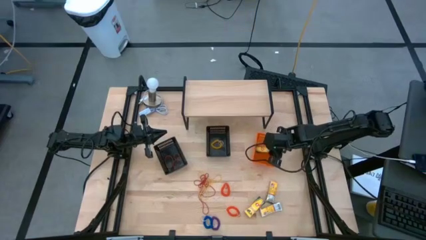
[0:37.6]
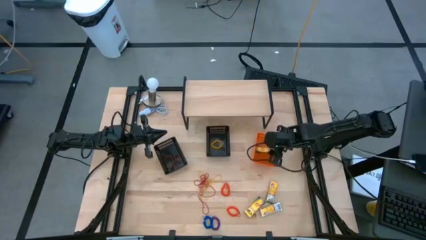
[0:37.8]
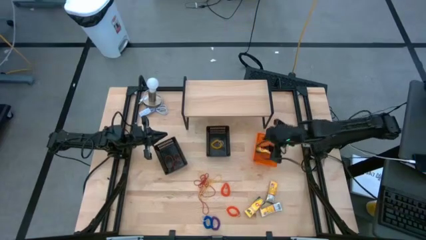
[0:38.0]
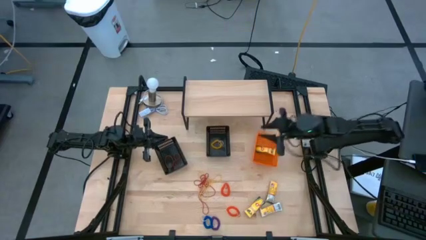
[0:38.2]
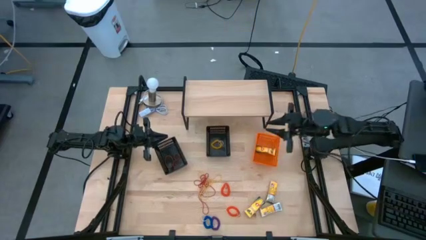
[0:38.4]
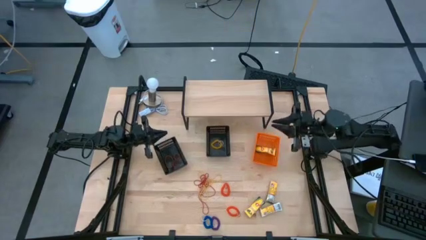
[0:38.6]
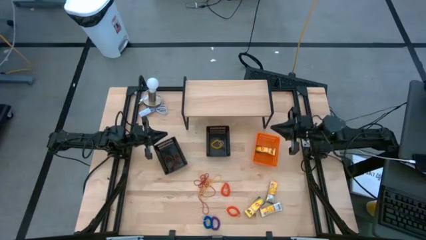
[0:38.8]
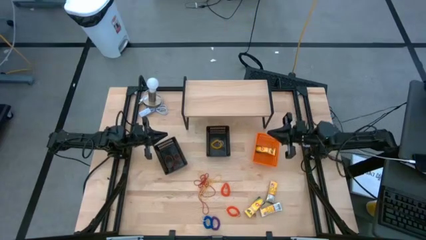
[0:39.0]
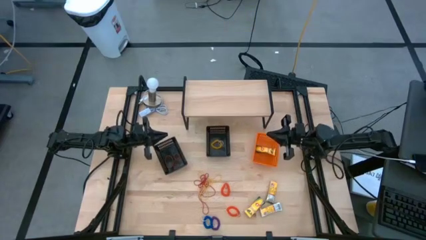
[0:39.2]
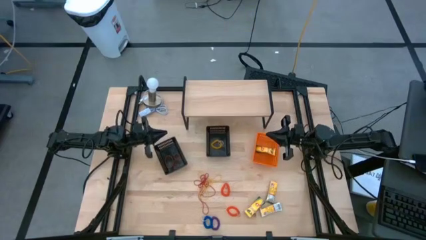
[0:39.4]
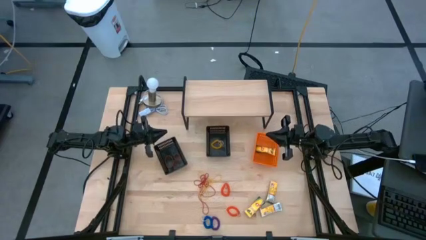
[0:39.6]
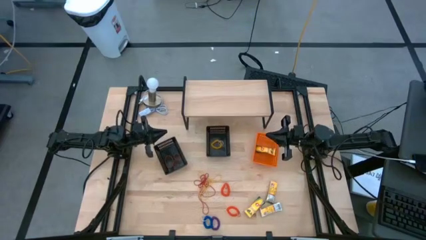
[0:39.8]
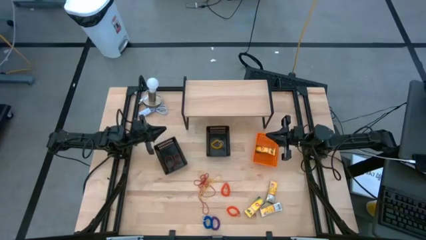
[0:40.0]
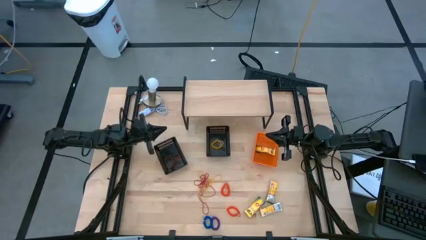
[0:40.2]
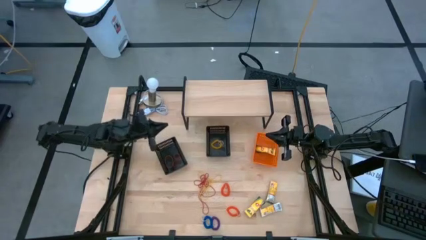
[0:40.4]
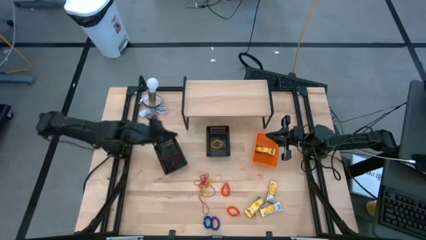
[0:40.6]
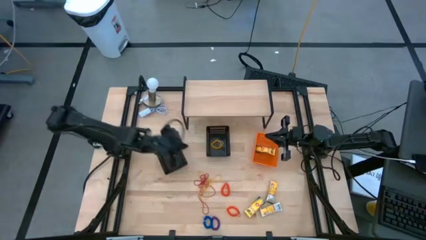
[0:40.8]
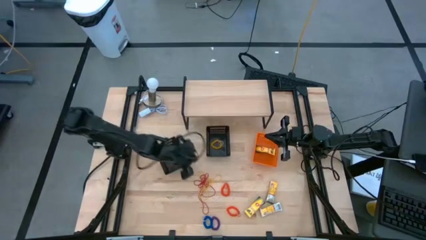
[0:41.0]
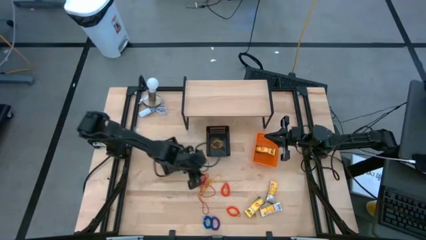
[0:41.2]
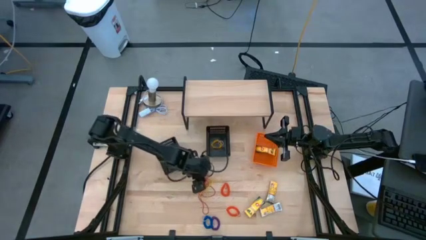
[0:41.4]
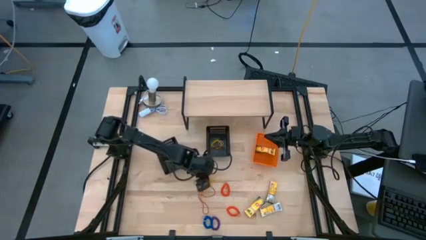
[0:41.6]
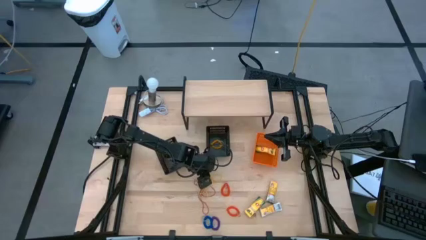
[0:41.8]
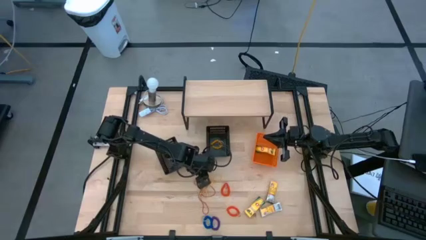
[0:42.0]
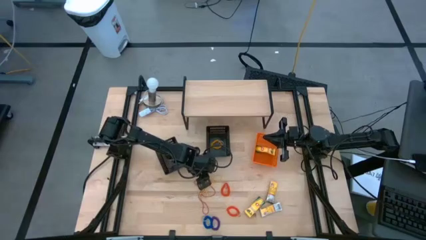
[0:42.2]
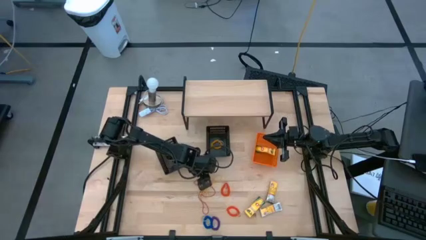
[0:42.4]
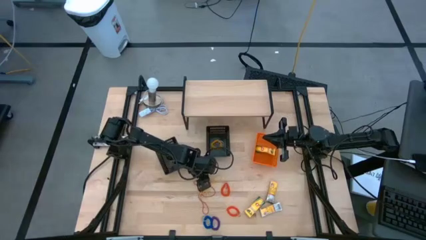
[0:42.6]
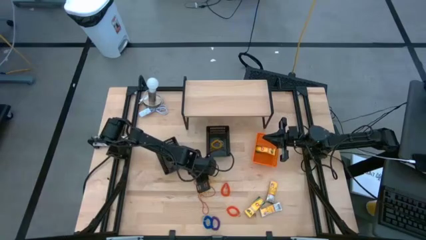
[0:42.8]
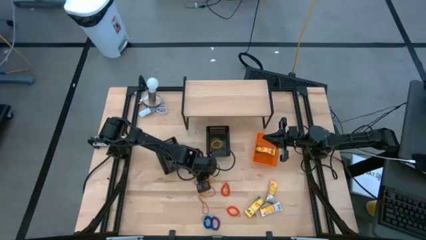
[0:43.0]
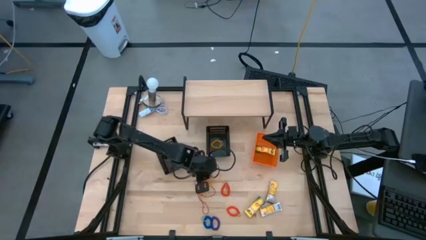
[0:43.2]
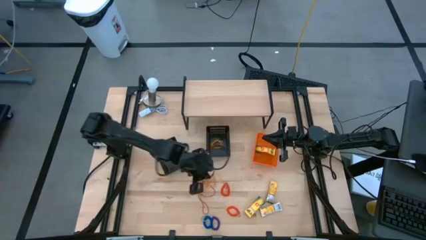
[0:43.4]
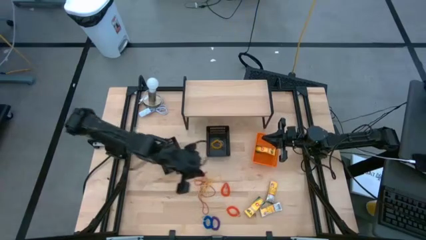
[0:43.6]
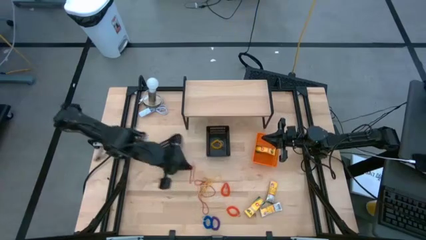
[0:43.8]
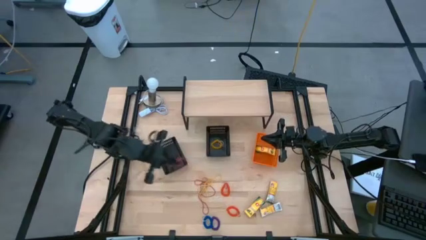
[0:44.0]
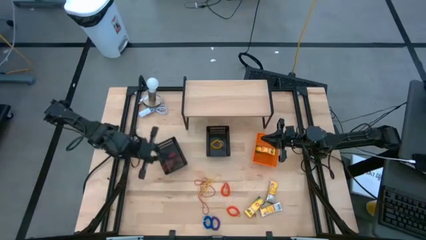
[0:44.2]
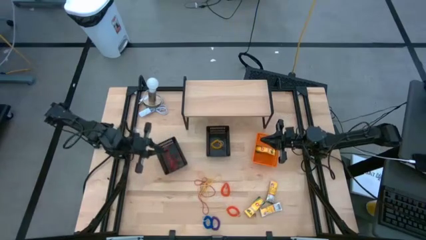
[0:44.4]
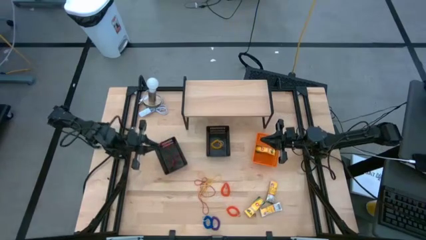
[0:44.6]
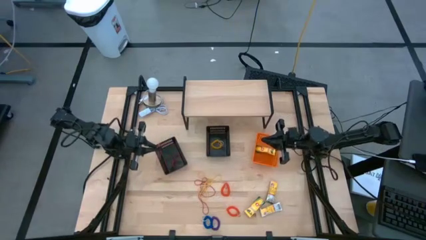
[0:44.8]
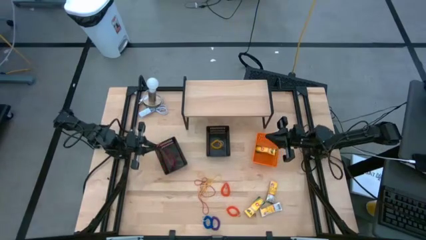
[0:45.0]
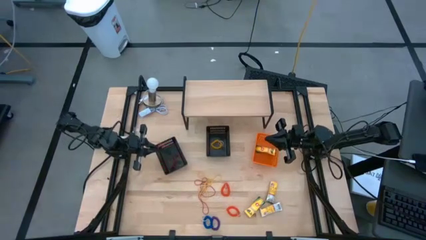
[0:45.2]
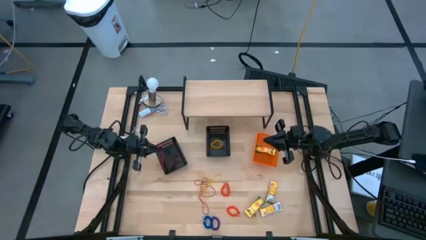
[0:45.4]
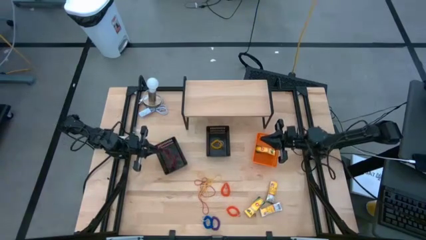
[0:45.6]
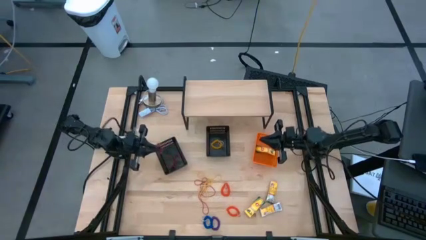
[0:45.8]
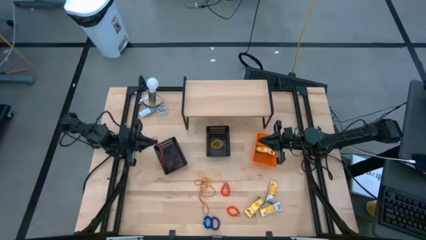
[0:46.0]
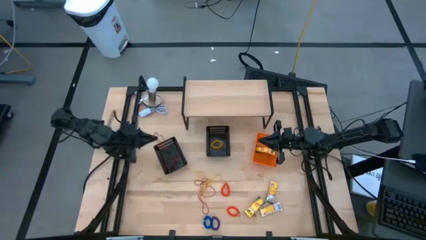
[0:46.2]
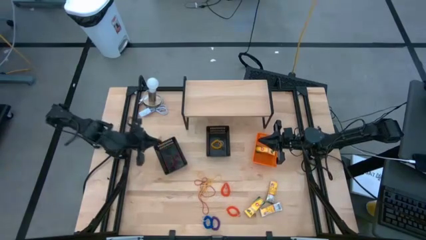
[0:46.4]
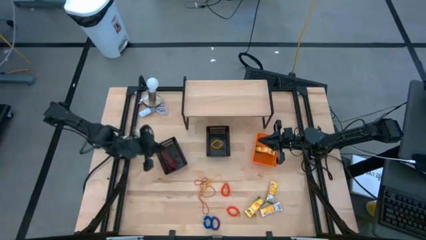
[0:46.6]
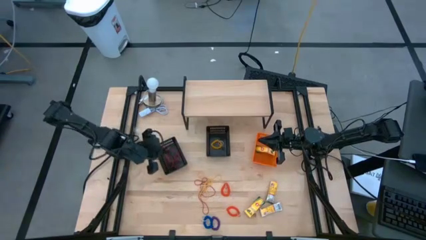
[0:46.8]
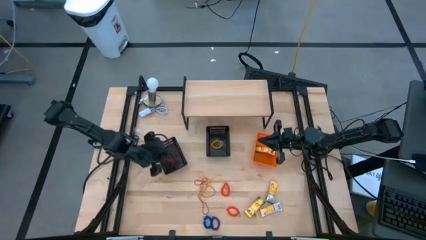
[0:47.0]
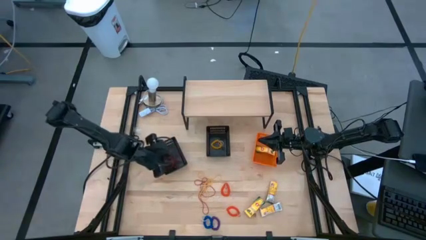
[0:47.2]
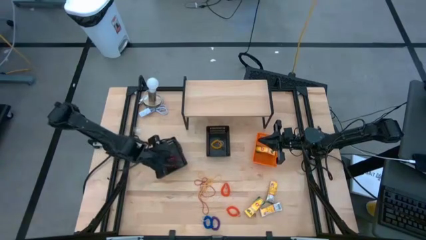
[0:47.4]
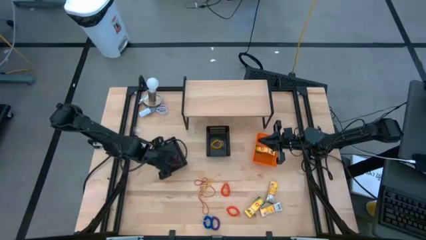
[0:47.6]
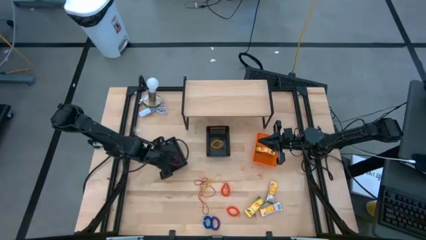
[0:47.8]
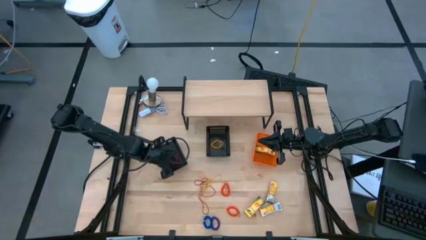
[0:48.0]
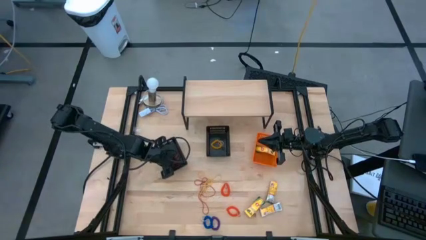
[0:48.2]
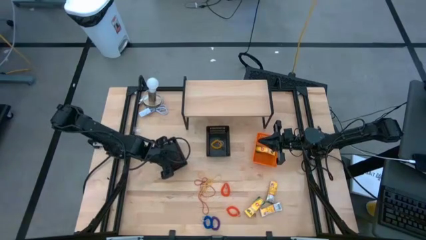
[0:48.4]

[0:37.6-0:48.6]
Task: Pick & Place Office Desk Supplies
Put the red rubber band into the left black basket

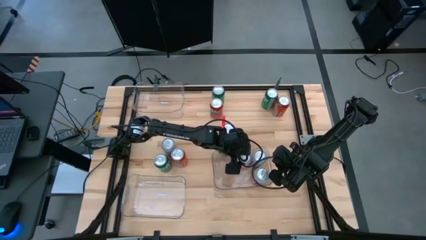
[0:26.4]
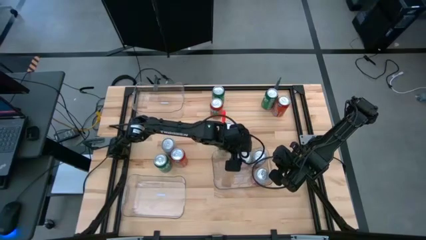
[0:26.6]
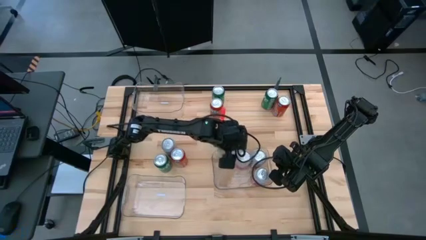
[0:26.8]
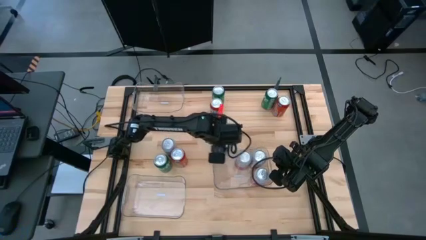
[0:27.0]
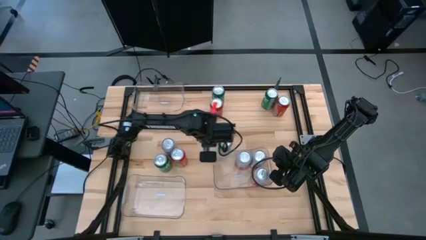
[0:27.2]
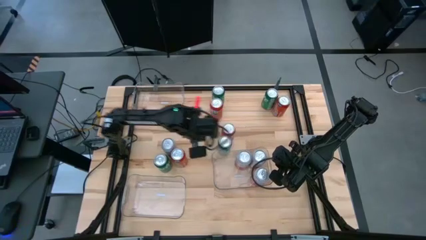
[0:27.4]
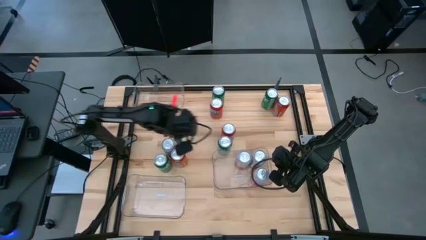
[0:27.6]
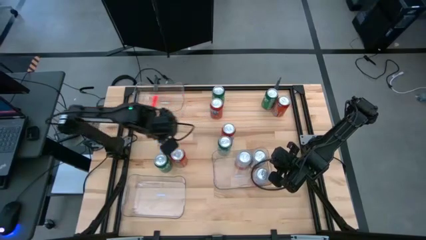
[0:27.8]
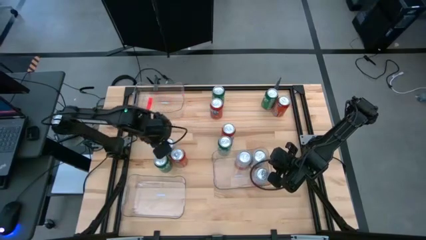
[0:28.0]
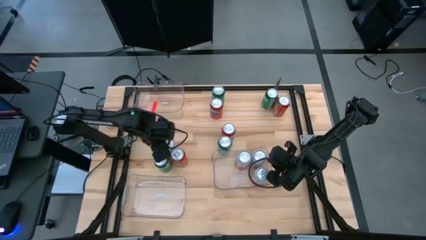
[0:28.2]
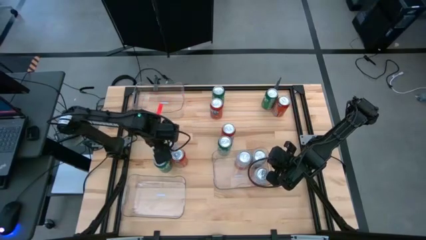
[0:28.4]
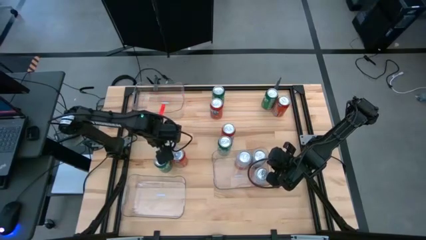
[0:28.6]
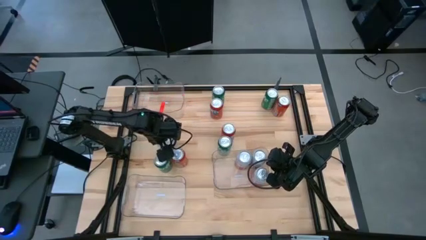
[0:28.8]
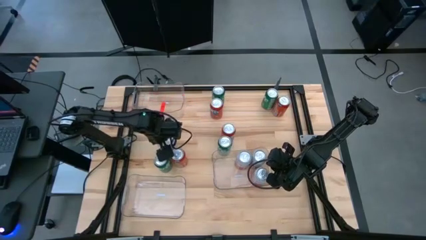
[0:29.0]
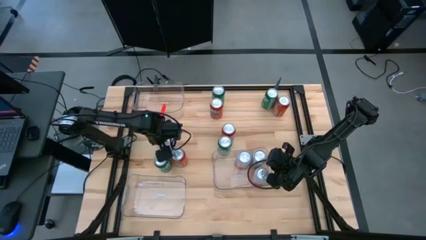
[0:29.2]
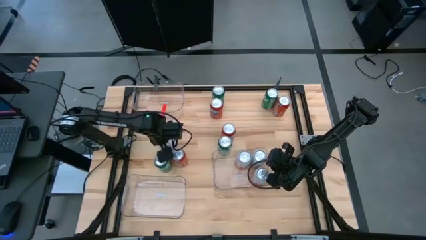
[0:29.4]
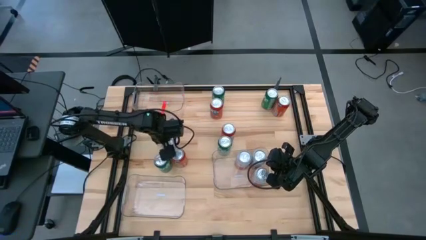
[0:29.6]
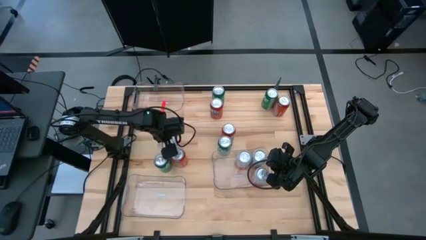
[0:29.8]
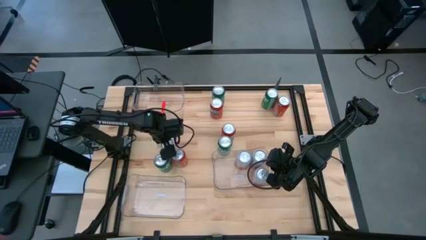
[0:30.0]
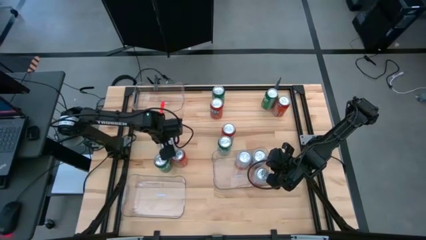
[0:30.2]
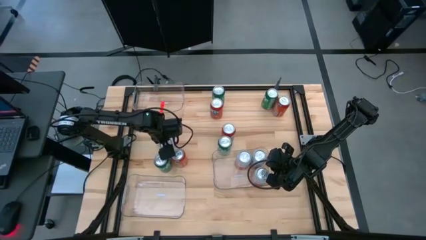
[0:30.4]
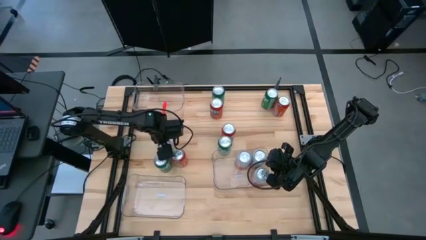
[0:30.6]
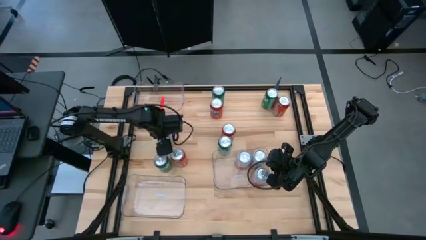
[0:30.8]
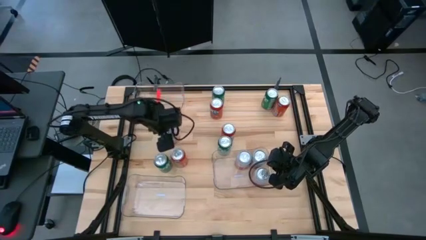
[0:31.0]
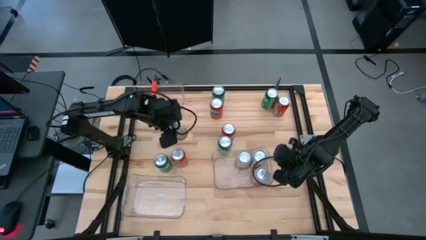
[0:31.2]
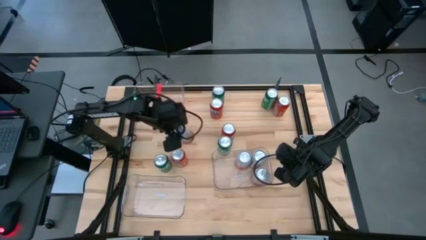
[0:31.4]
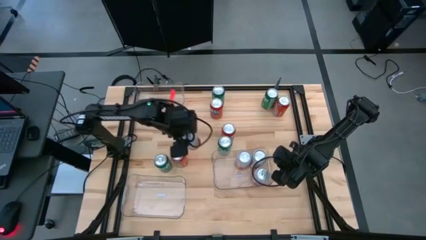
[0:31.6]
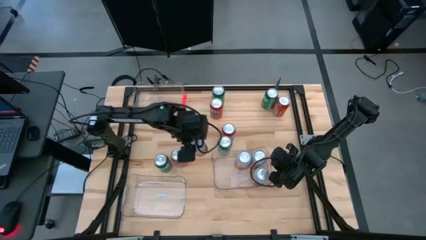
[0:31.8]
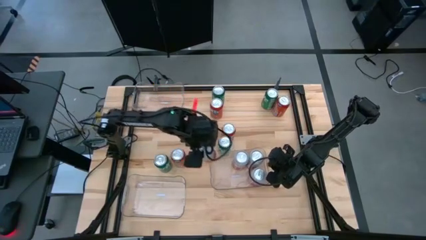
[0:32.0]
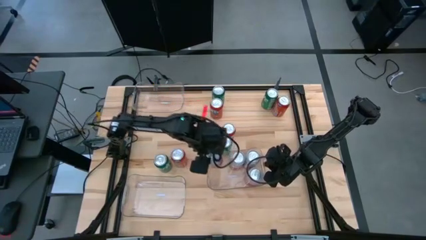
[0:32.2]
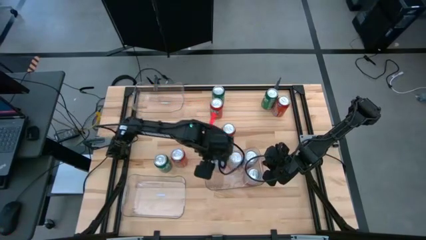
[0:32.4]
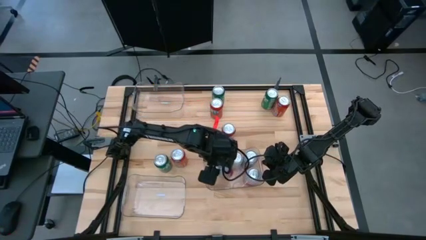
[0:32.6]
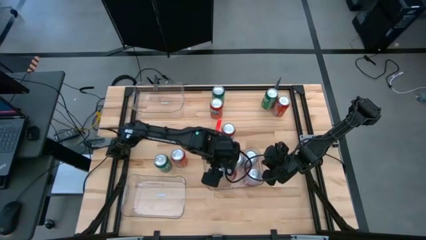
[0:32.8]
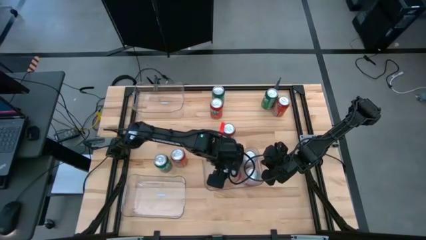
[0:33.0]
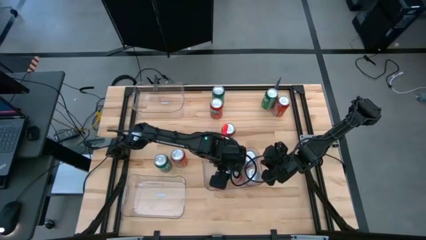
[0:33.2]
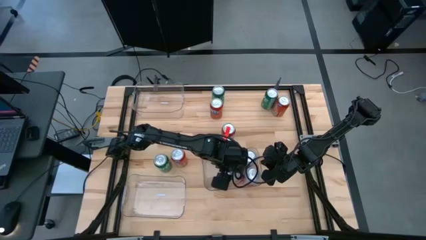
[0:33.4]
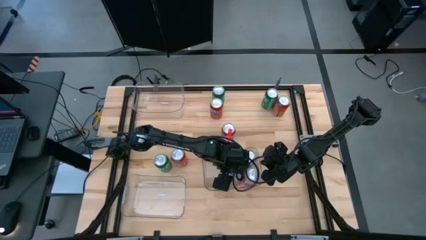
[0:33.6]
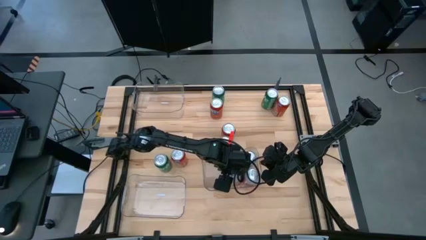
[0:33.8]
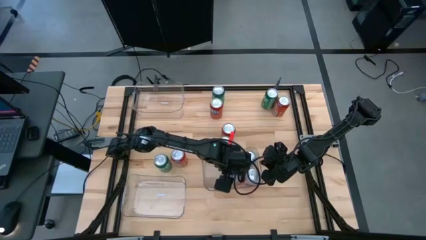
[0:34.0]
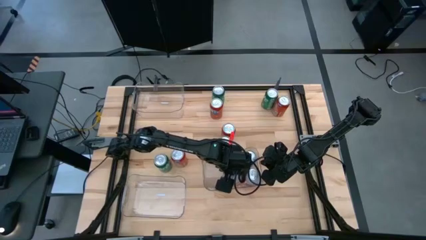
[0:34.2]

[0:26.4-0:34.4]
Task: Sort soda cans
Put the pink/white soda can into the bottom right transparent bin
